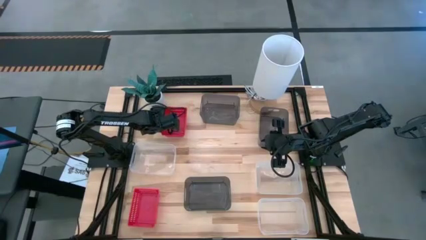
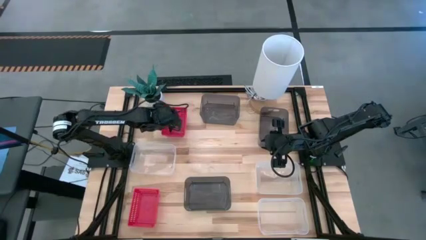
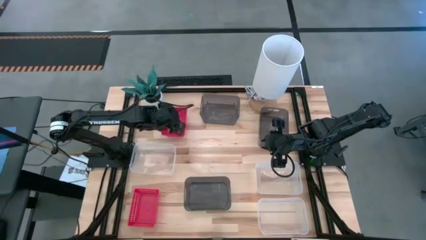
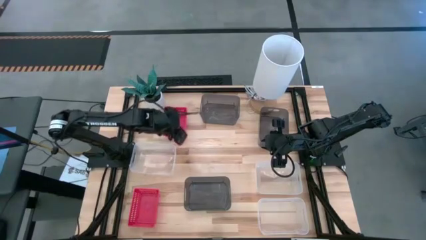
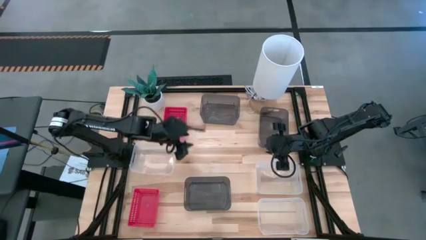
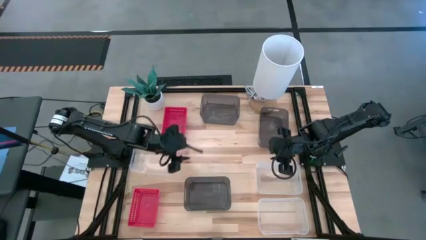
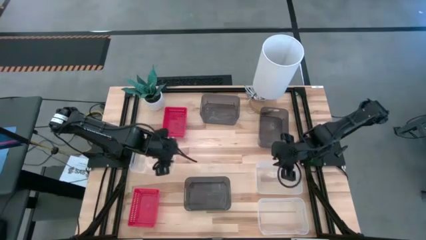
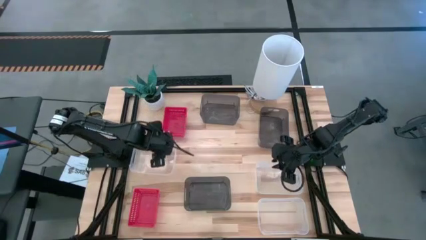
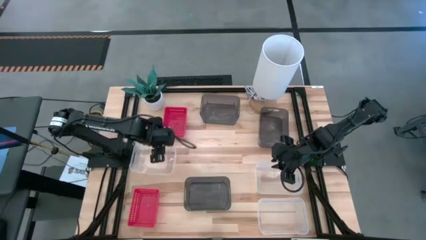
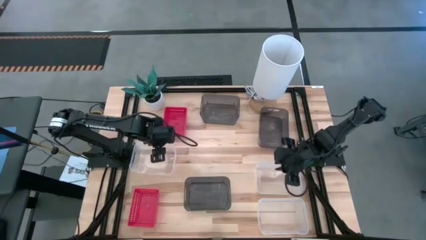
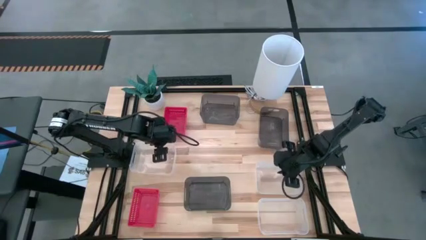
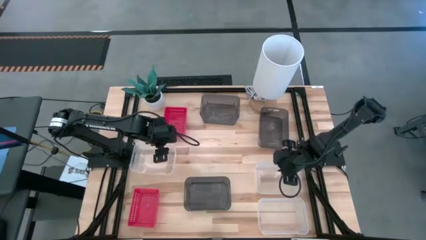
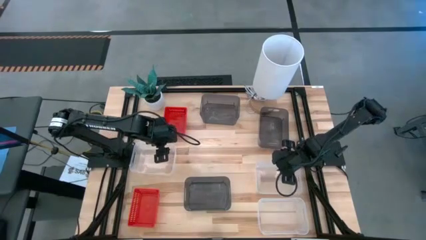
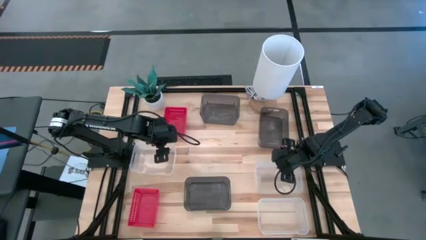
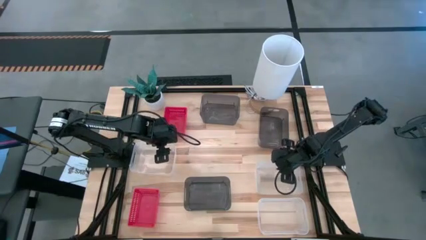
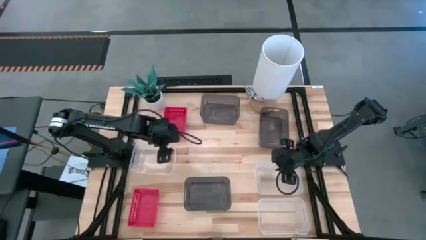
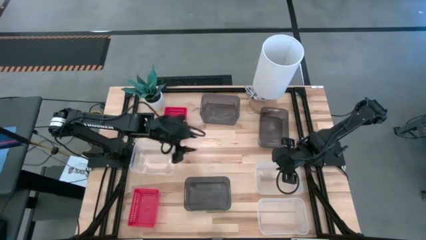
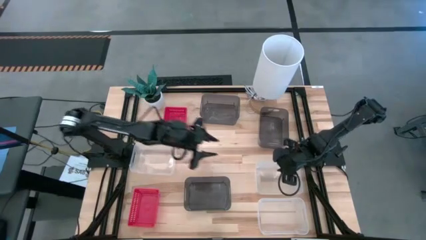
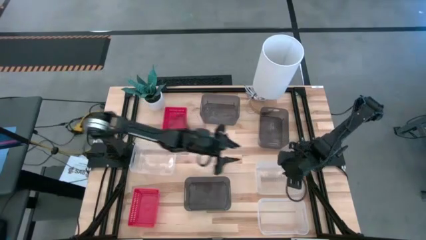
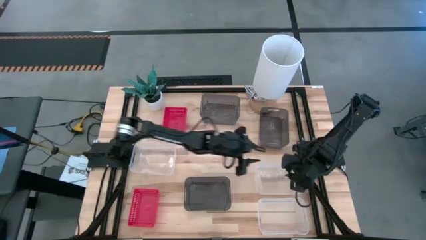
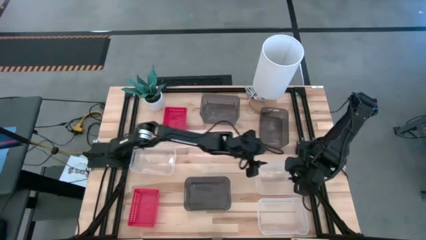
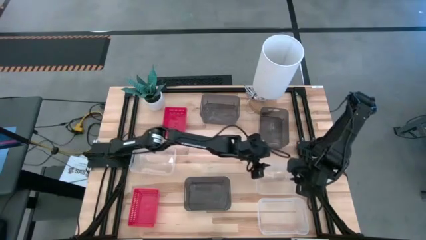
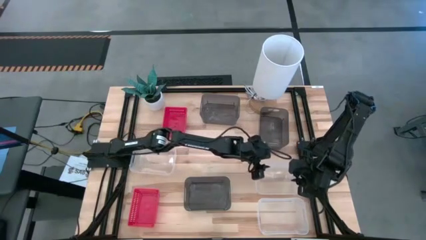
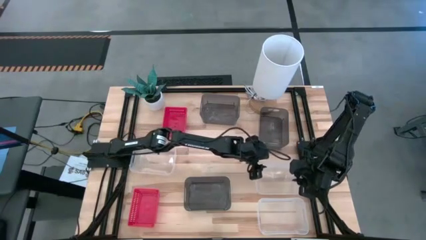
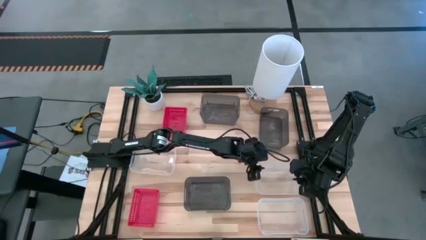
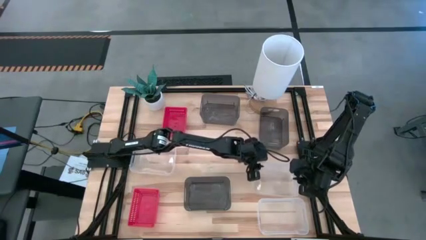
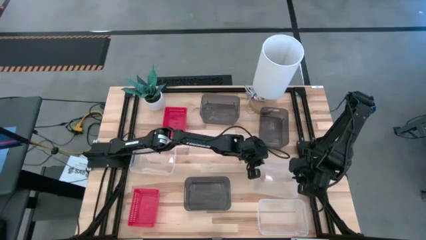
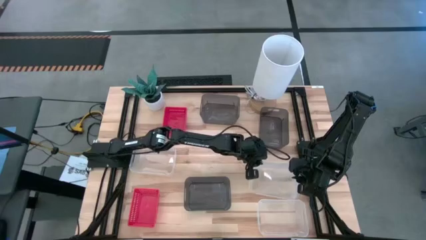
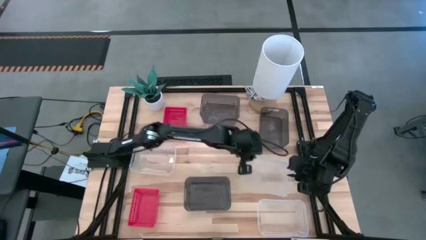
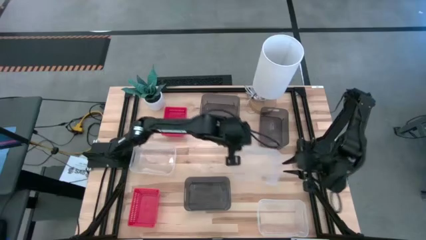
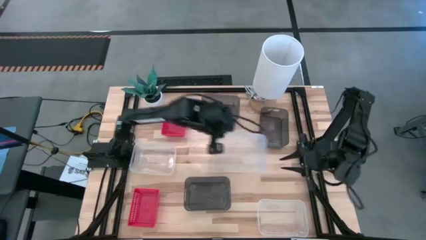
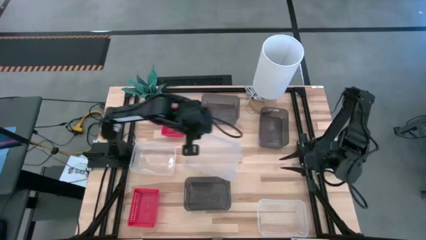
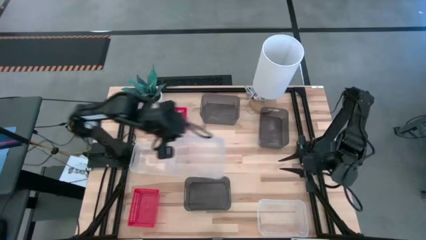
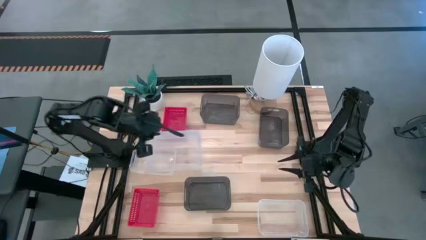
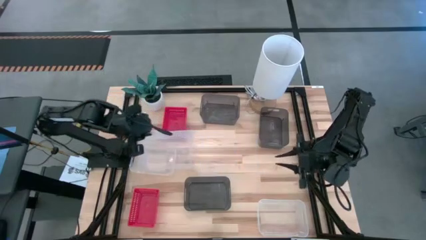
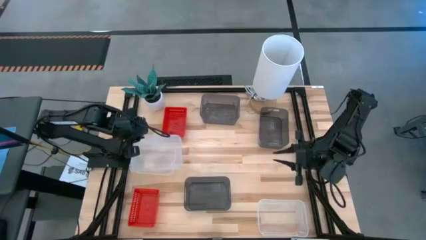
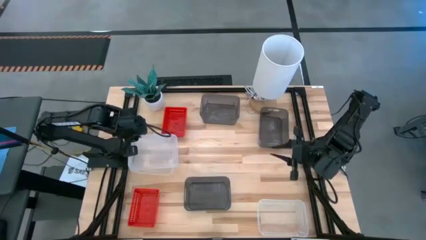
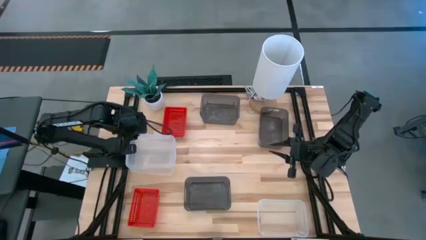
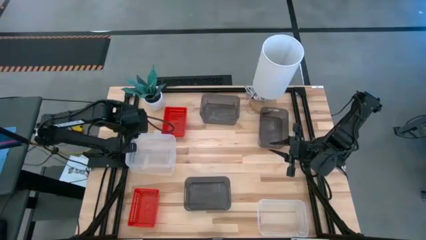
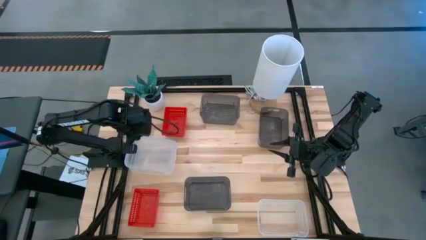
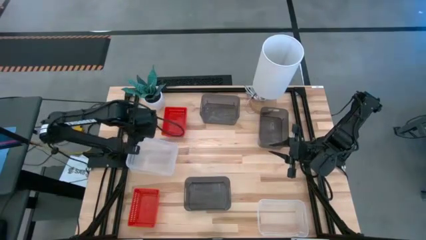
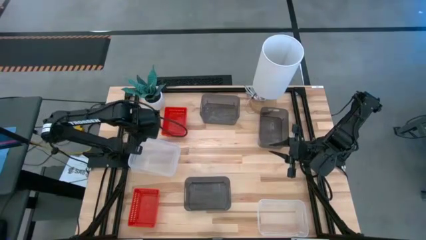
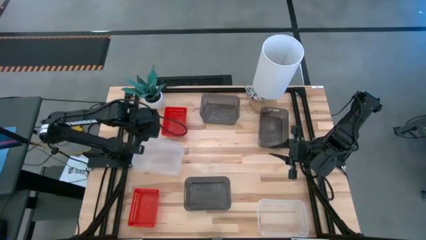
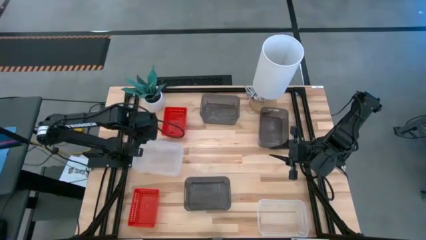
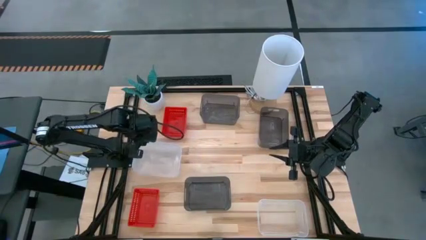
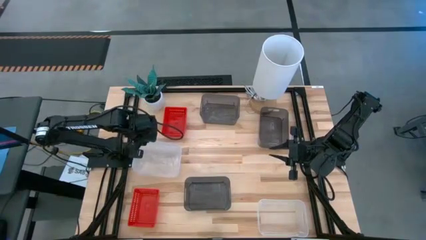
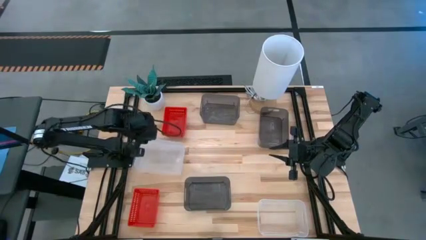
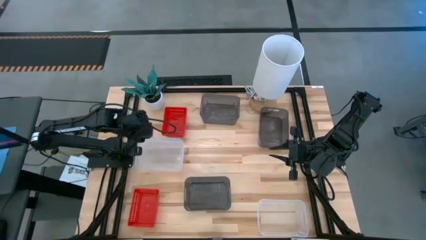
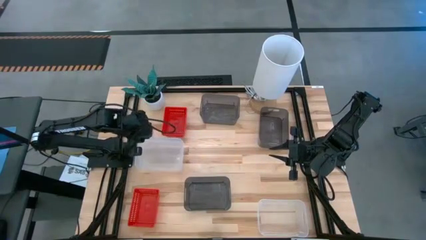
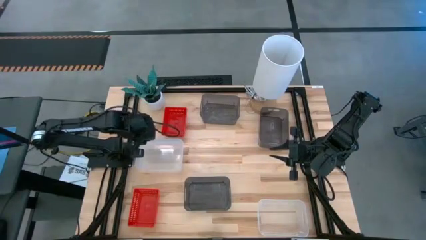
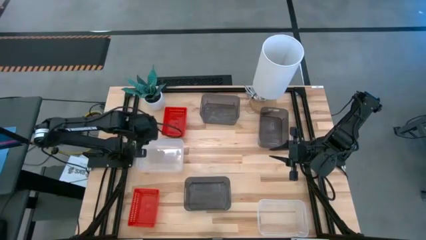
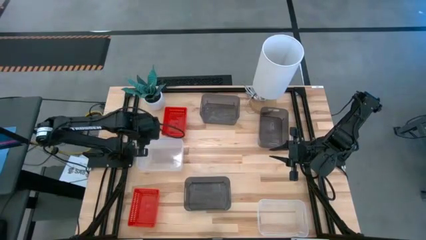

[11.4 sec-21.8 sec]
Stack the middle transparent bin on the left transparent bin

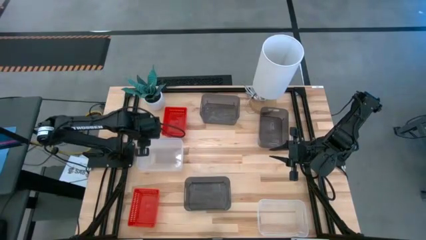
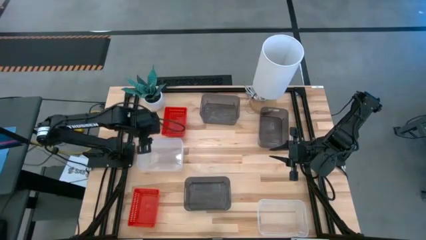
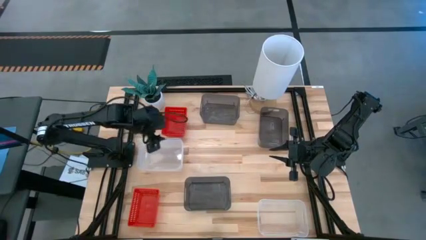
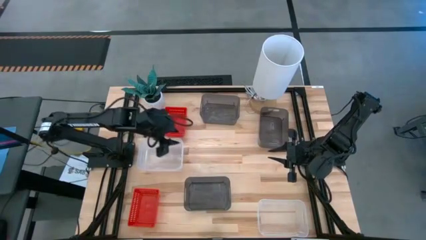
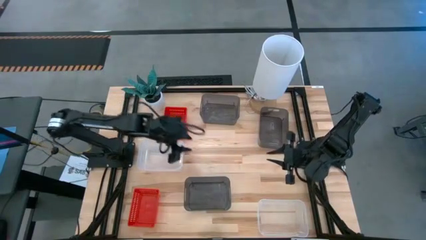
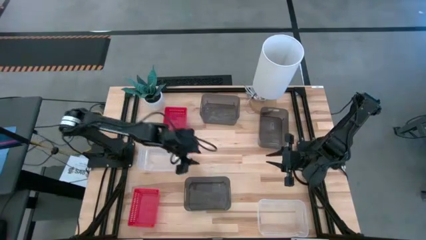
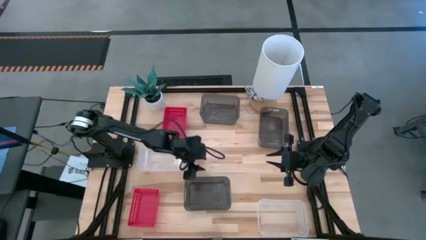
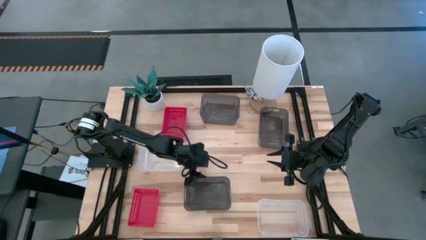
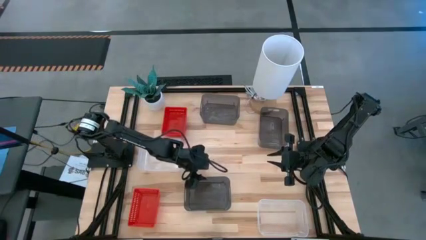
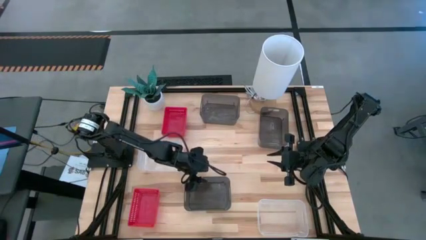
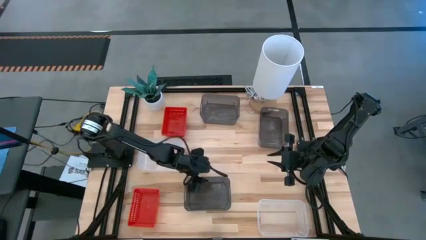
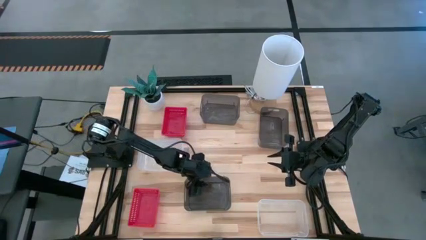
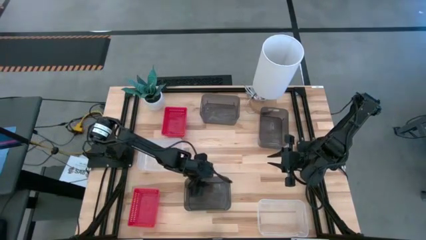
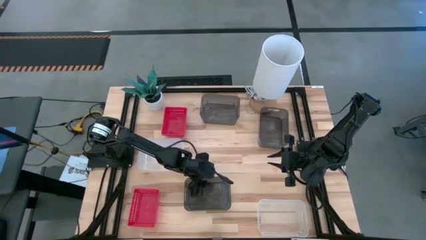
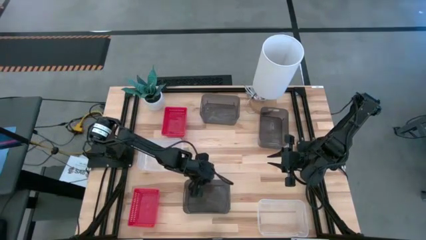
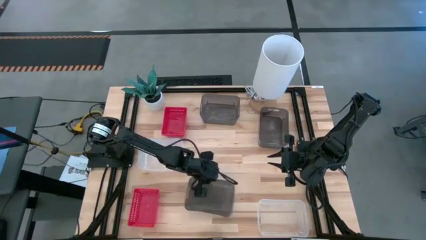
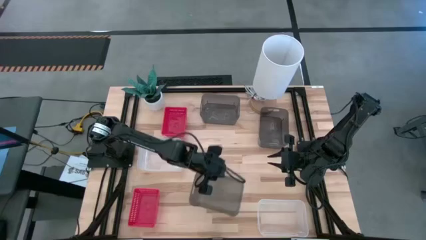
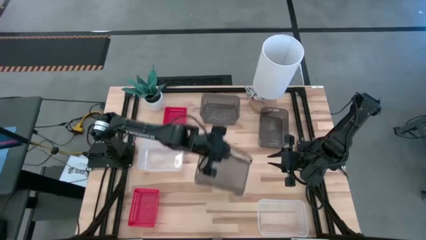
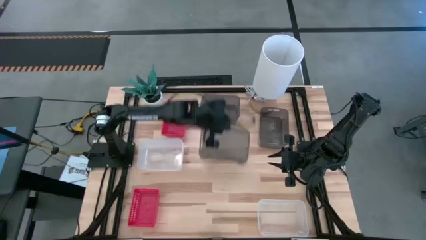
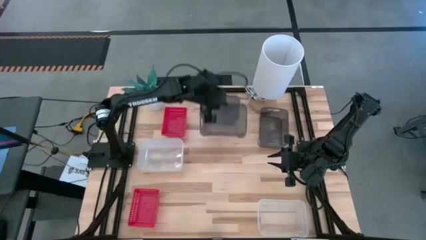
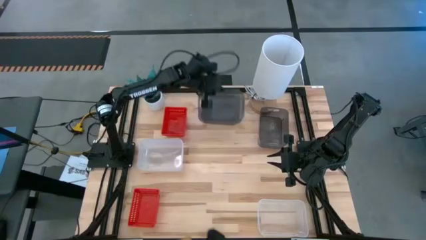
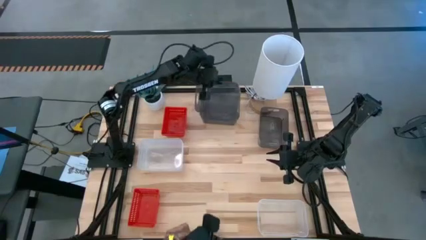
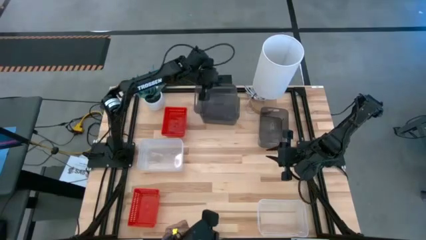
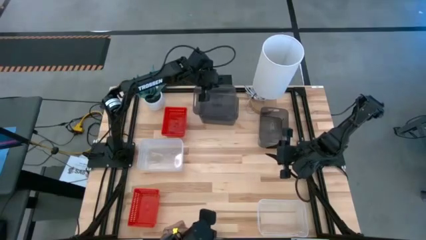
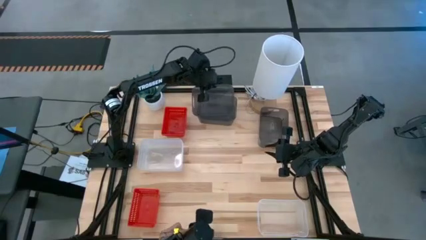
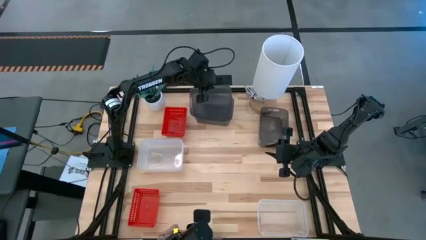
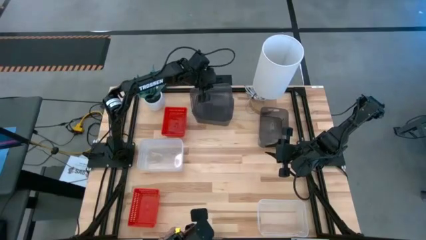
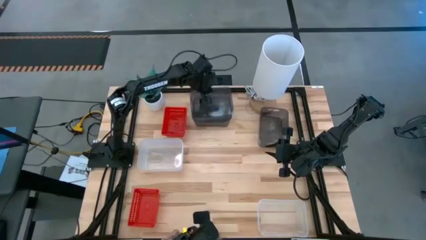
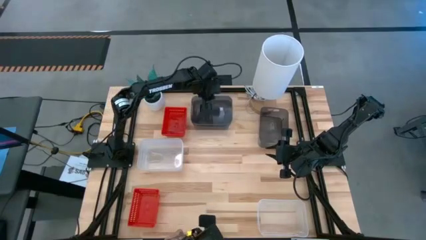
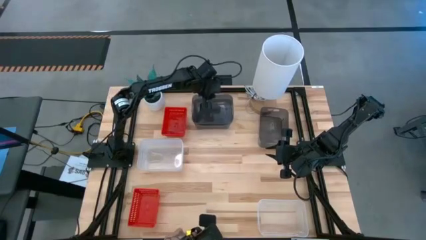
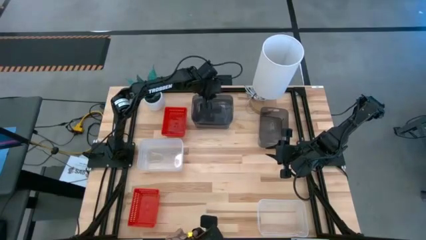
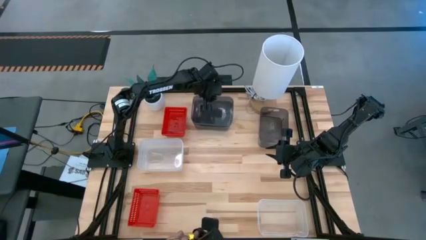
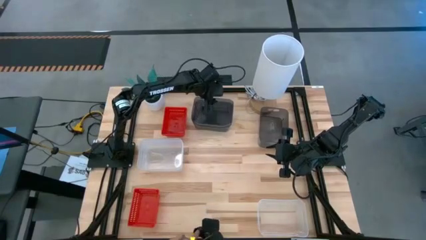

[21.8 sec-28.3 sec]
Stack the bottom black bin on the top black bin
